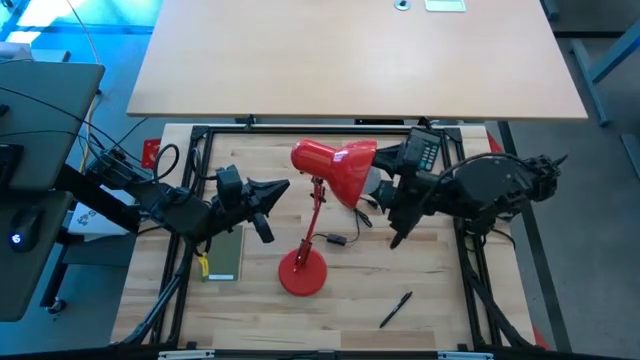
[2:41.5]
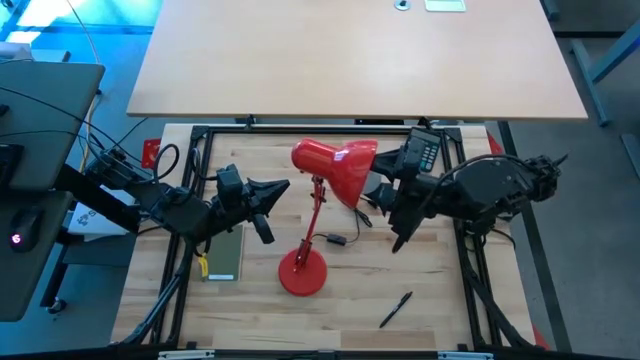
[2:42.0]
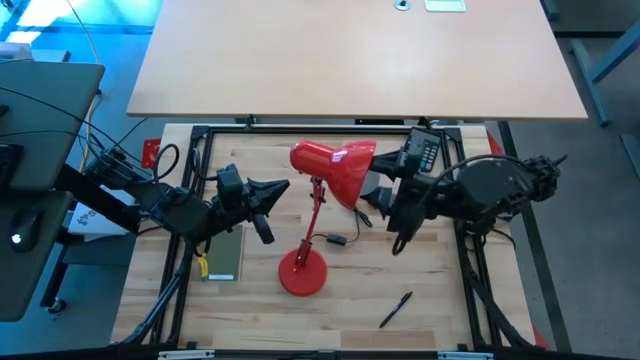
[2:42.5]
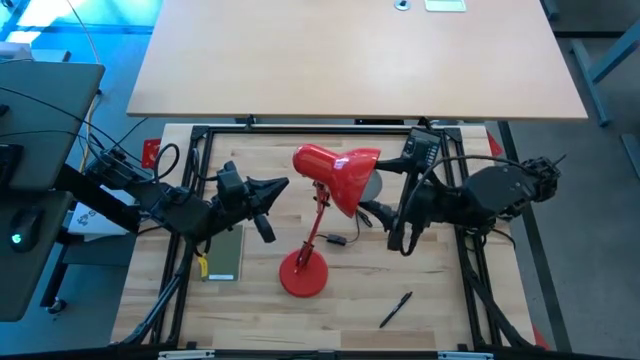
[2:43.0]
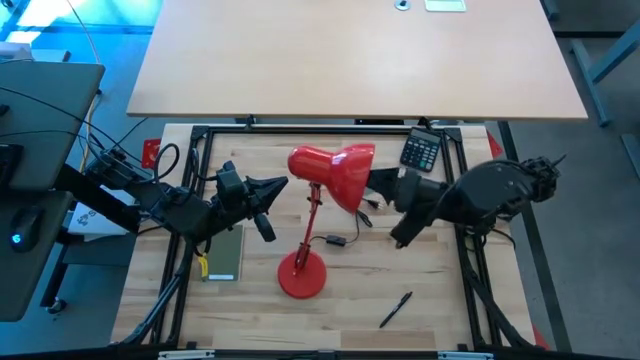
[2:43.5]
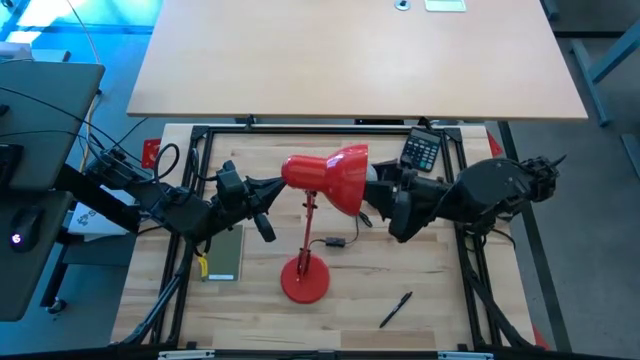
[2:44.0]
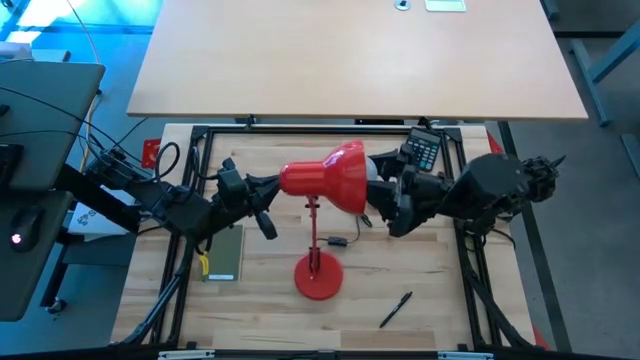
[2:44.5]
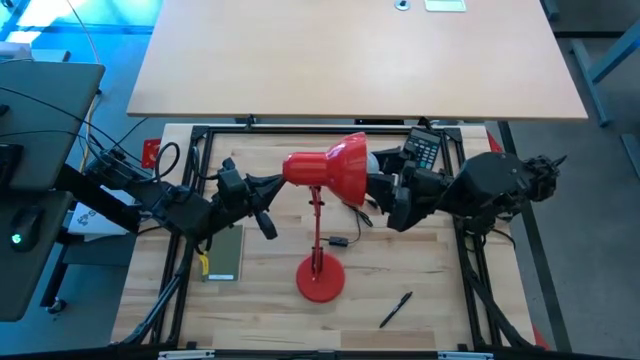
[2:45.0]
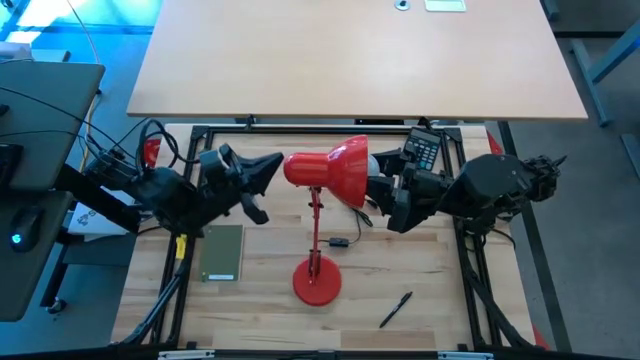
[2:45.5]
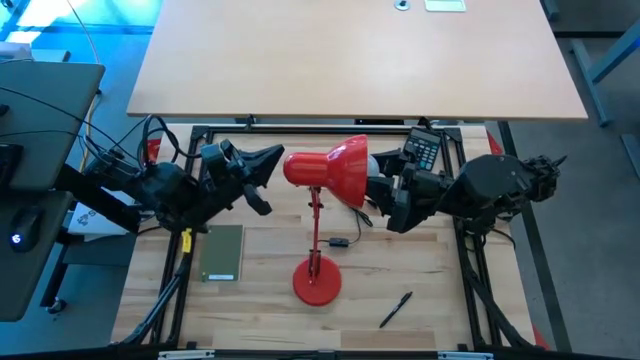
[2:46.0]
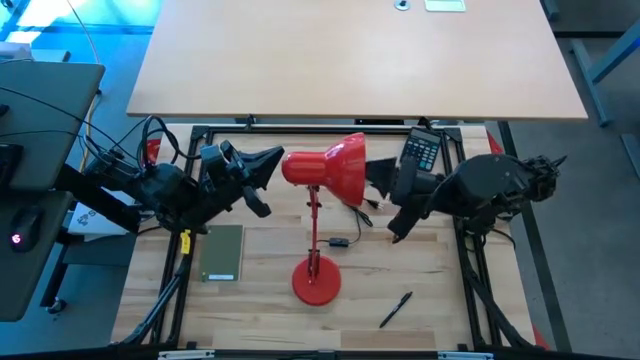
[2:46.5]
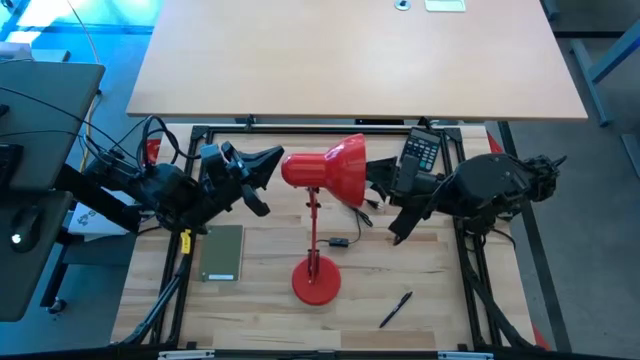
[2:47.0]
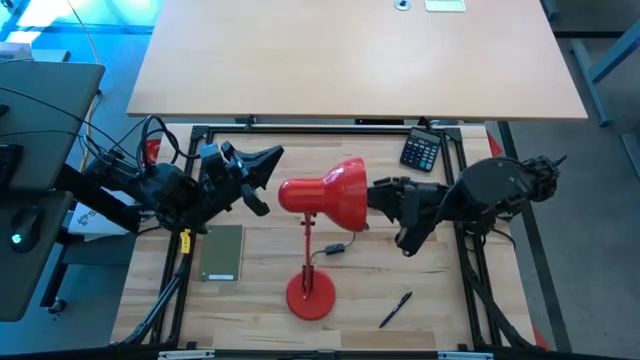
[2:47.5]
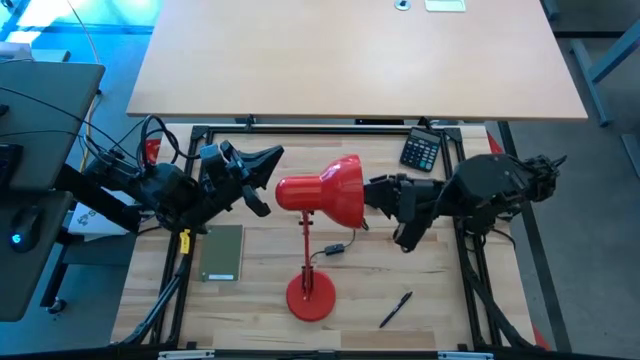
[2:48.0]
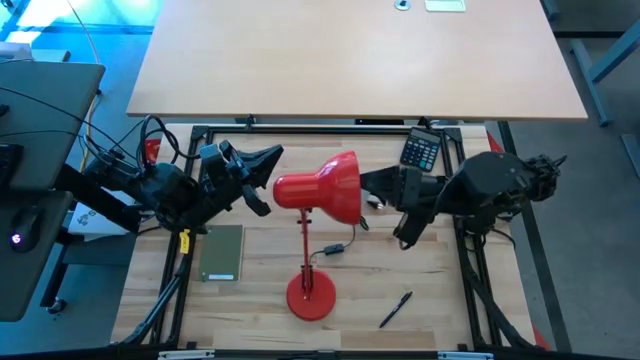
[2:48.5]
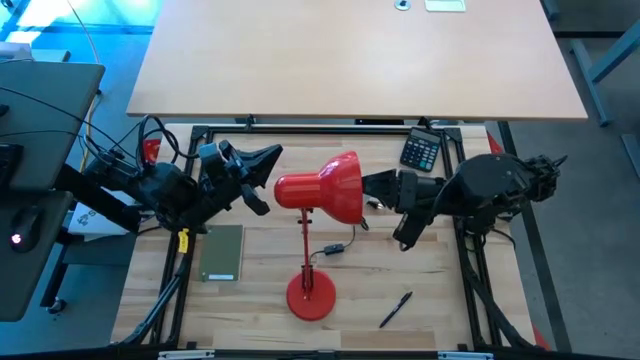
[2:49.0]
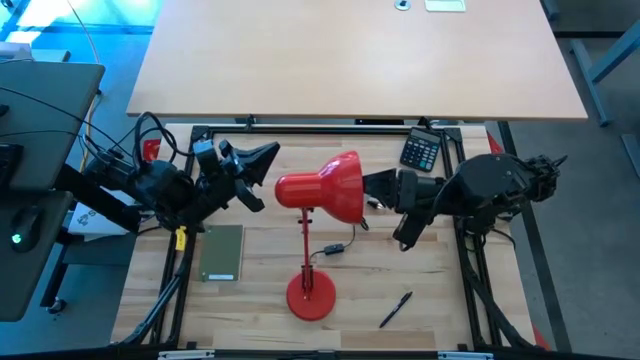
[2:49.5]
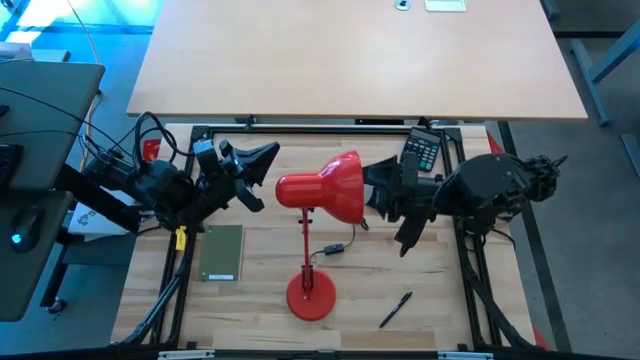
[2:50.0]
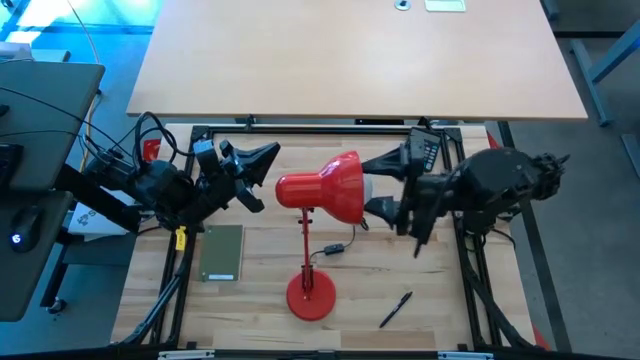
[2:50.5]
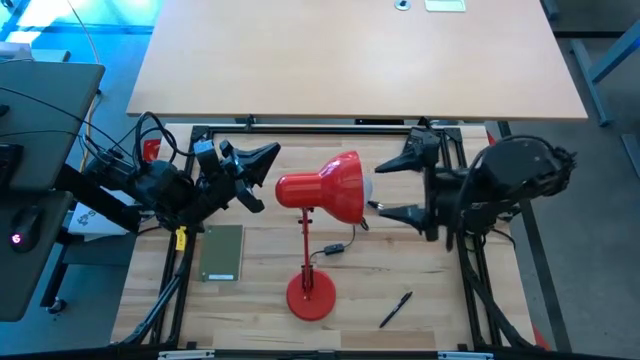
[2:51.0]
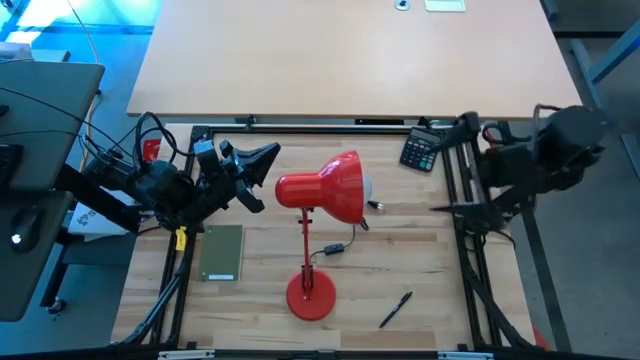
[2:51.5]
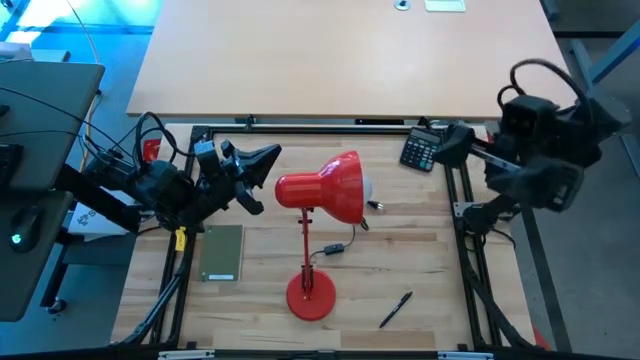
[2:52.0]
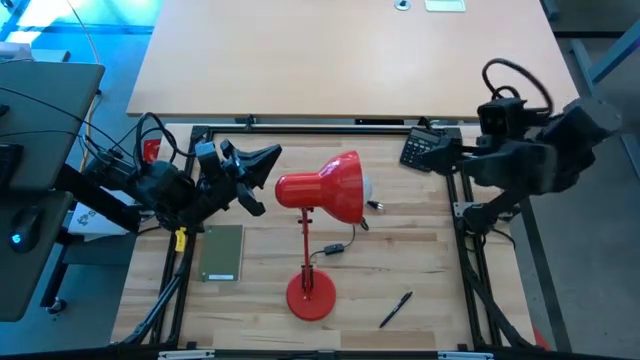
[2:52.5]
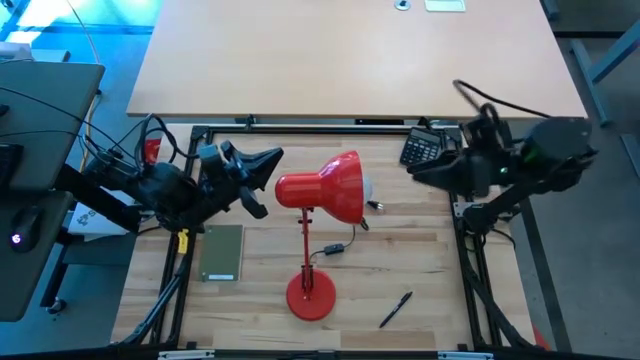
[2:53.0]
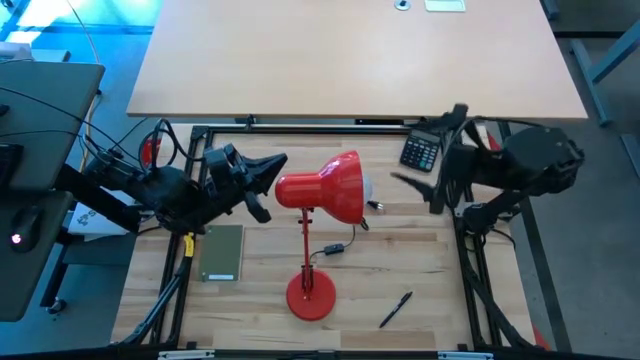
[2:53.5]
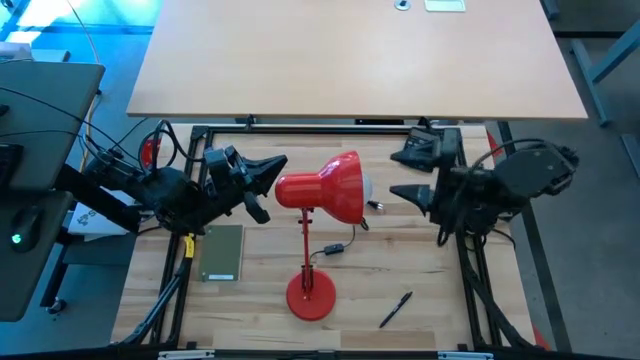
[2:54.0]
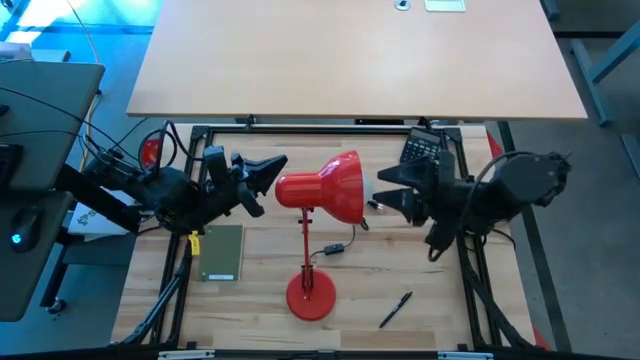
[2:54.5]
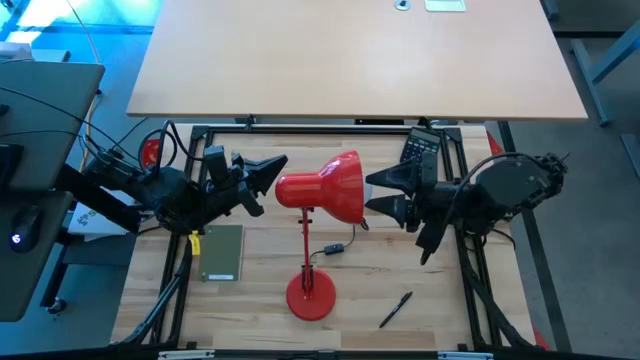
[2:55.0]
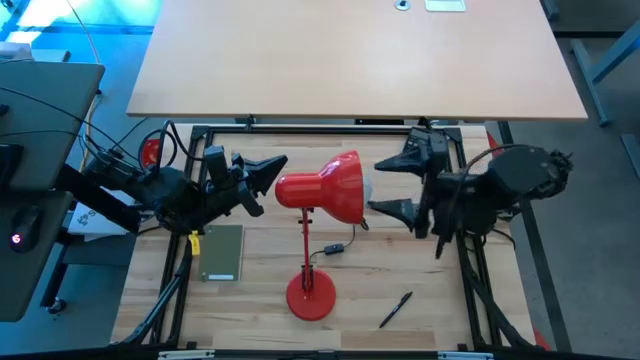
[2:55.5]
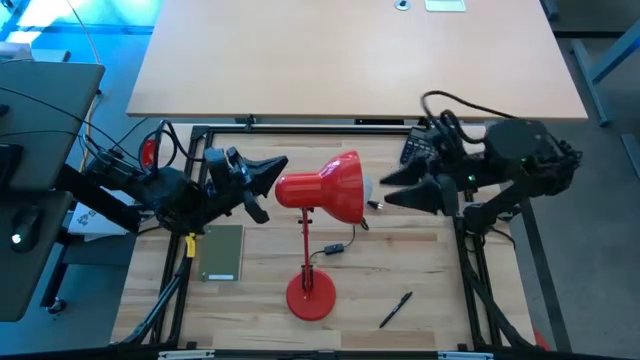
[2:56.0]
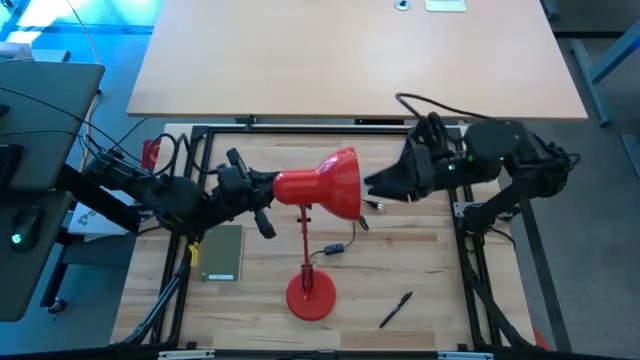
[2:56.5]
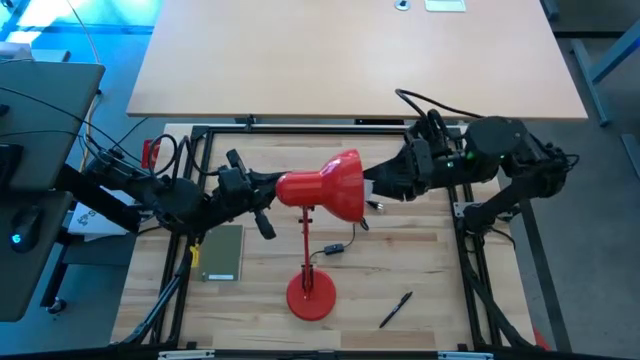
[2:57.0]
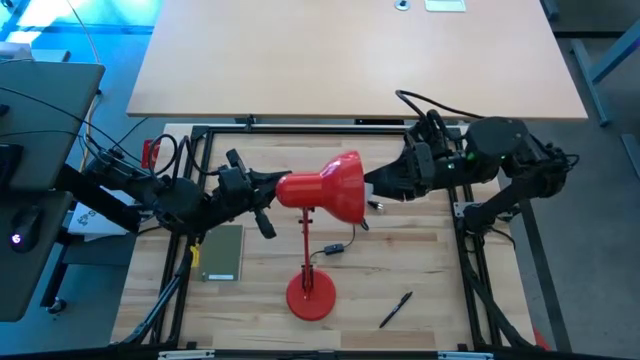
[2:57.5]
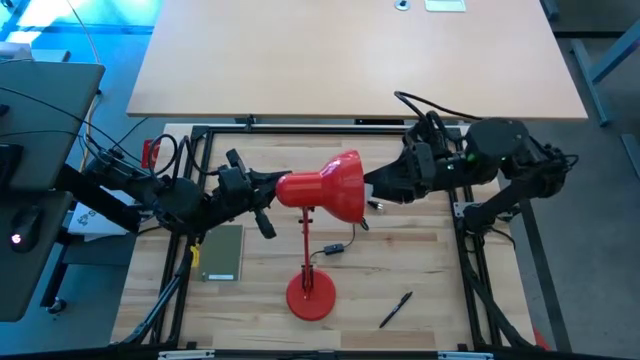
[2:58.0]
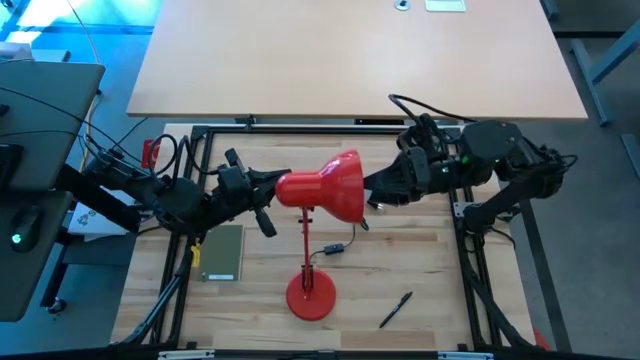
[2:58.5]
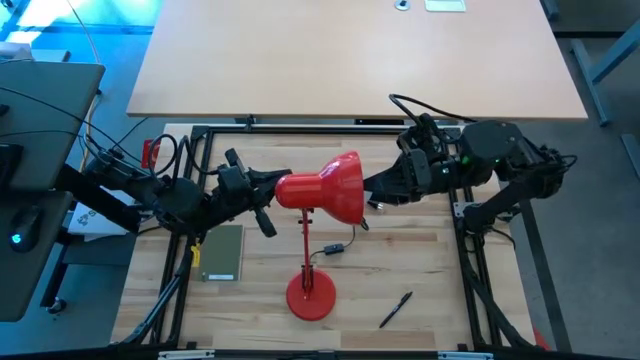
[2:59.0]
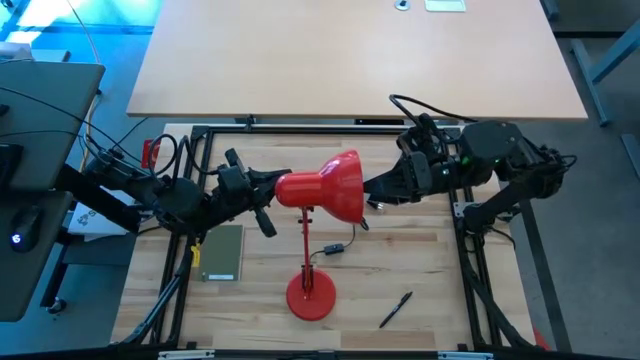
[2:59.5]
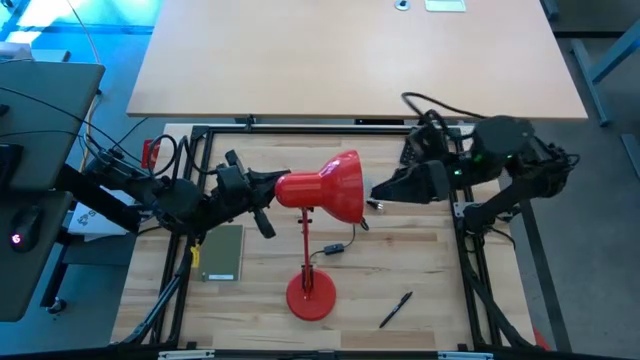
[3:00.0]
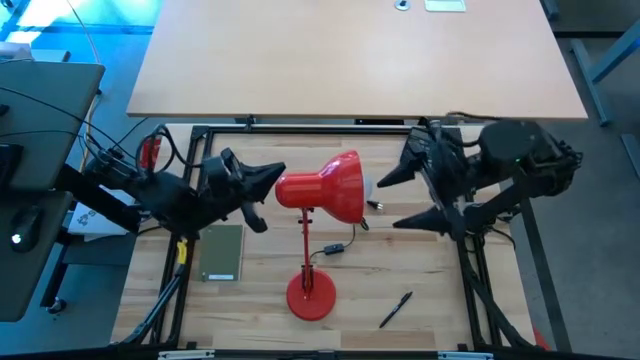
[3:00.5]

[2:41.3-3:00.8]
Task: Screw lightbulb
Insert the white lightbulb into the red lamp

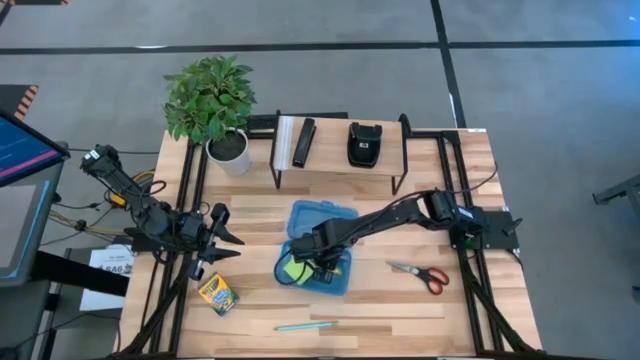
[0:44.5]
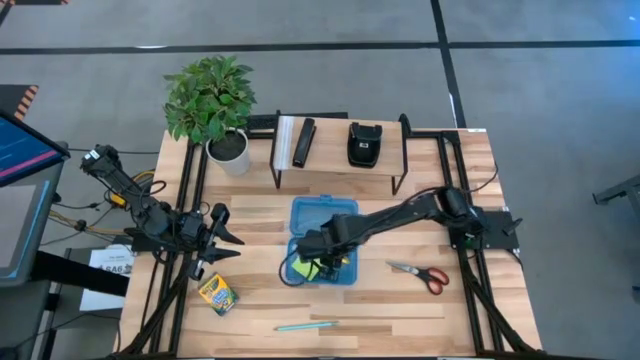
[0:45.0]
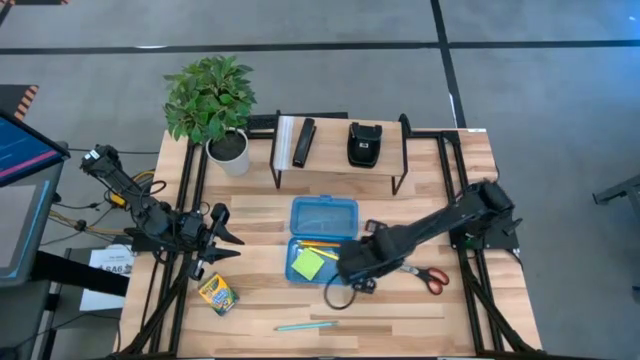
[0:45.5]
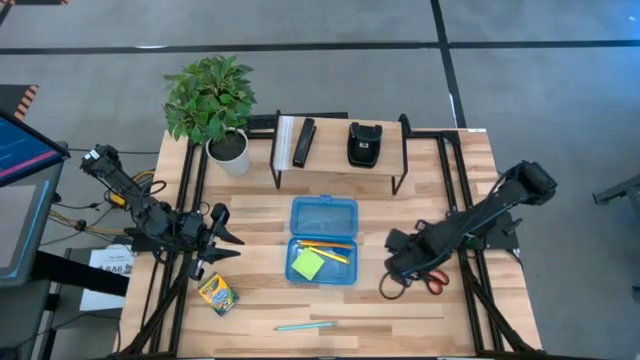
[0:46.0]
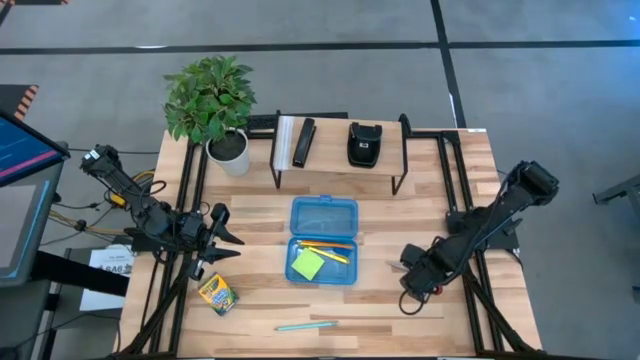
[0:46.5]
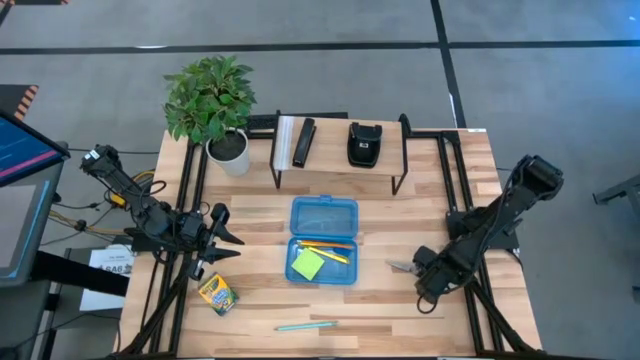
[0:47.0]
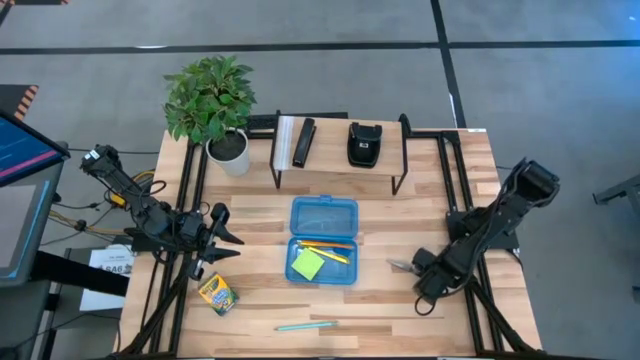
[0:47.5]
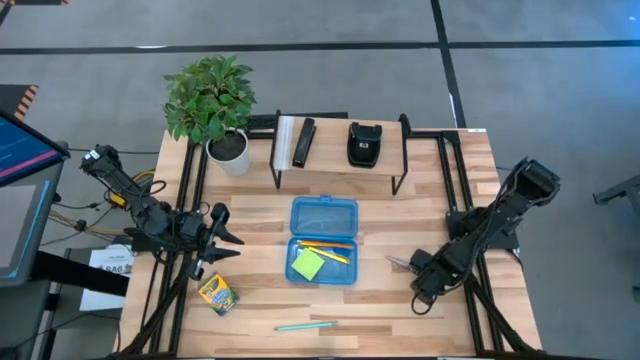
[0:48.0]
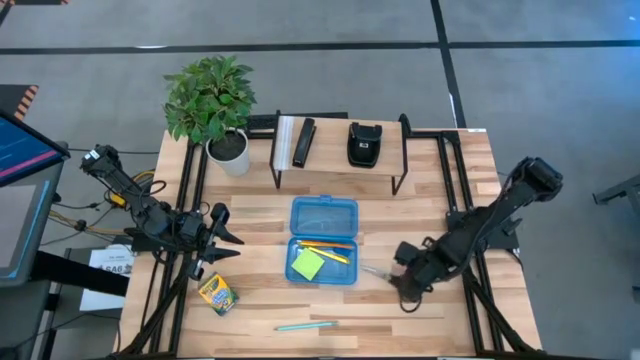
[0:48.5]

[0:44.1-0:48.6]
Task: Pack school essentials
Put the black scissors into the blue supply box
